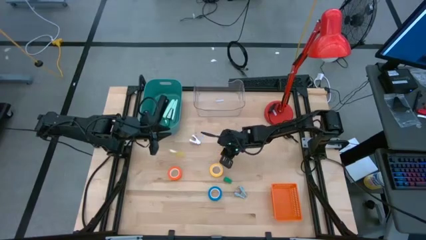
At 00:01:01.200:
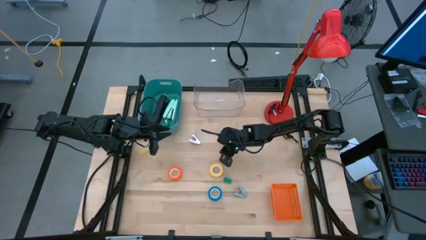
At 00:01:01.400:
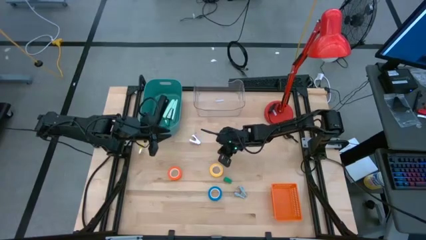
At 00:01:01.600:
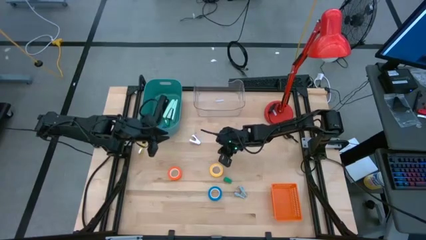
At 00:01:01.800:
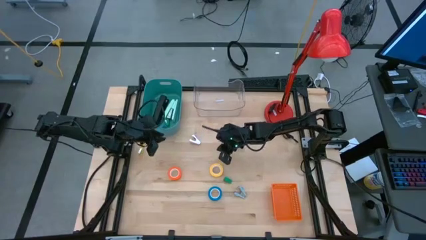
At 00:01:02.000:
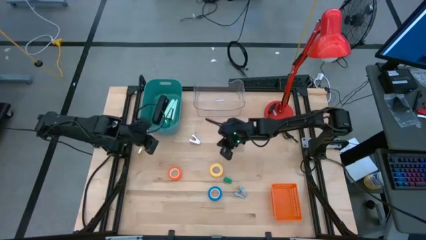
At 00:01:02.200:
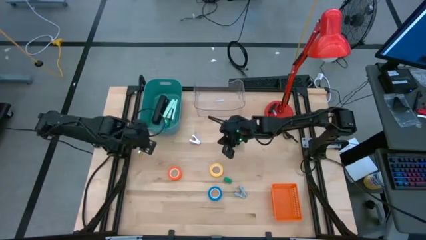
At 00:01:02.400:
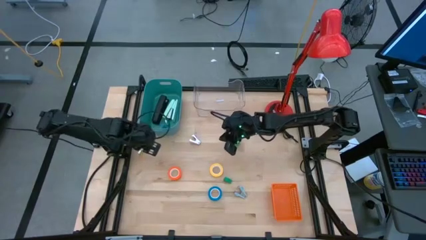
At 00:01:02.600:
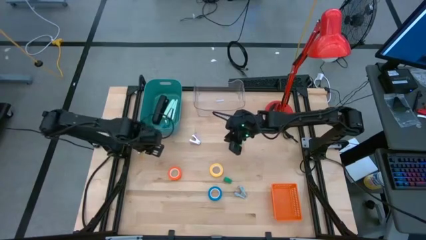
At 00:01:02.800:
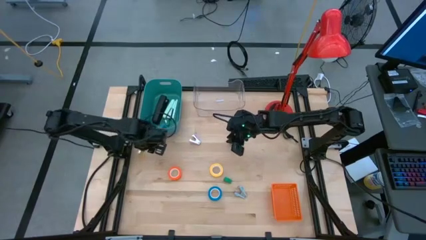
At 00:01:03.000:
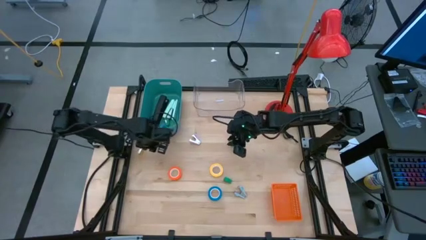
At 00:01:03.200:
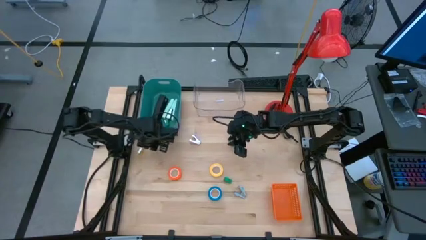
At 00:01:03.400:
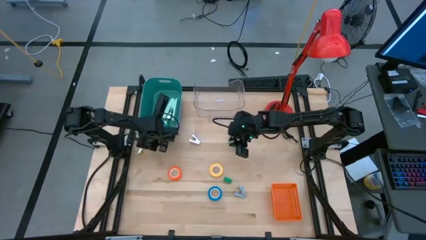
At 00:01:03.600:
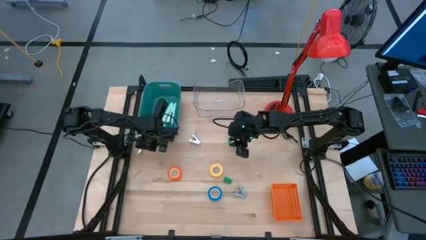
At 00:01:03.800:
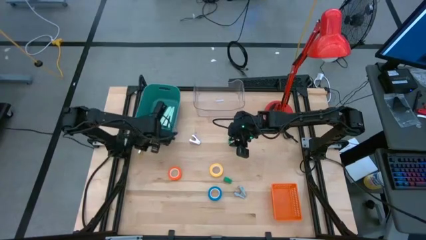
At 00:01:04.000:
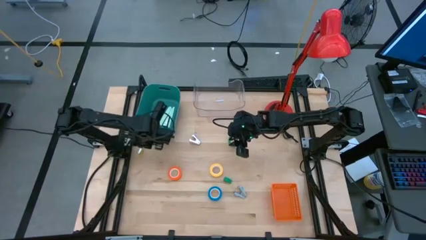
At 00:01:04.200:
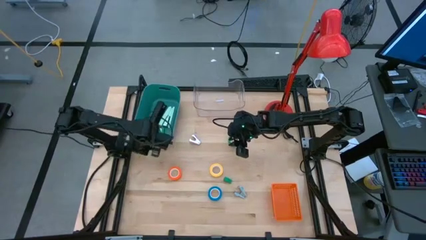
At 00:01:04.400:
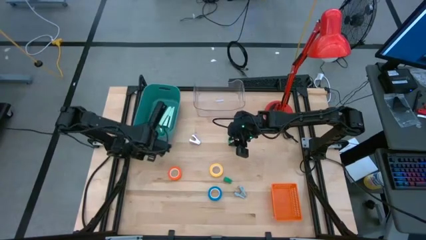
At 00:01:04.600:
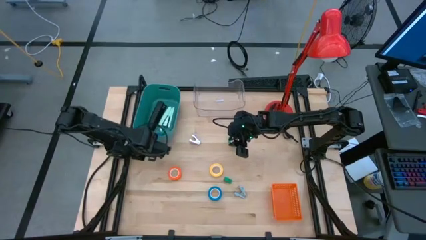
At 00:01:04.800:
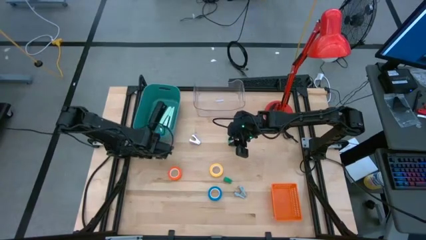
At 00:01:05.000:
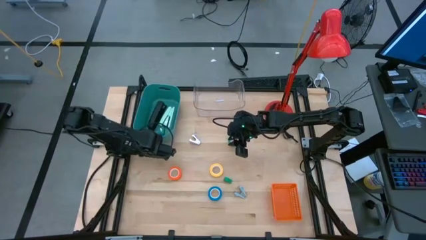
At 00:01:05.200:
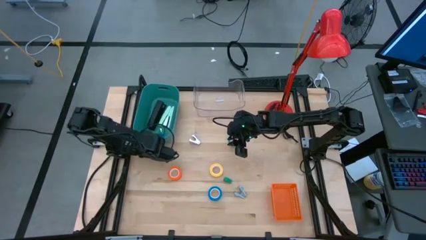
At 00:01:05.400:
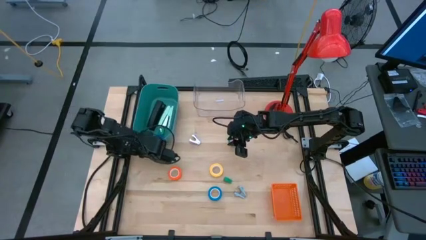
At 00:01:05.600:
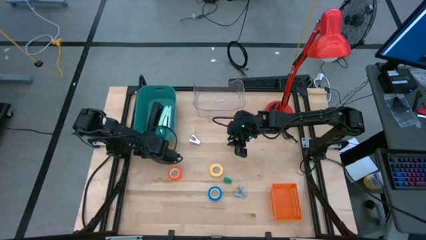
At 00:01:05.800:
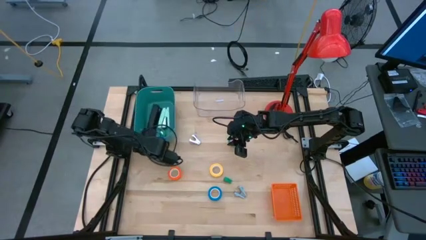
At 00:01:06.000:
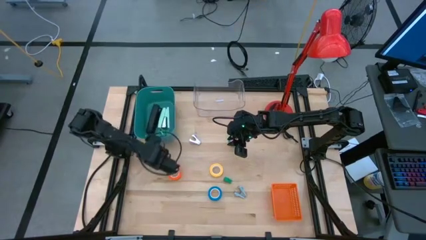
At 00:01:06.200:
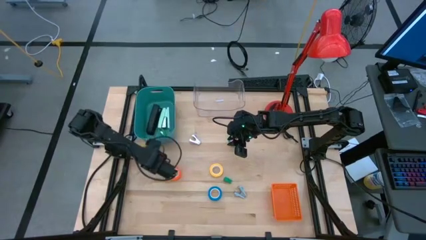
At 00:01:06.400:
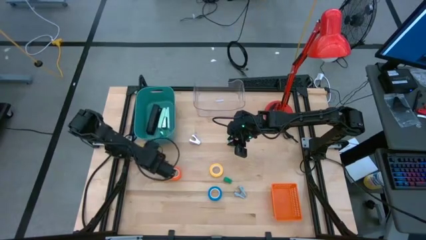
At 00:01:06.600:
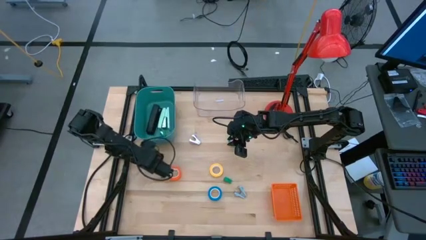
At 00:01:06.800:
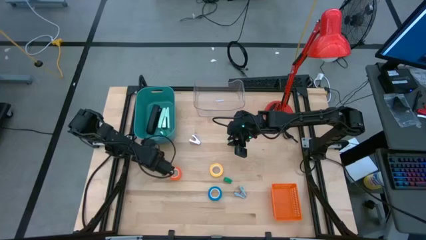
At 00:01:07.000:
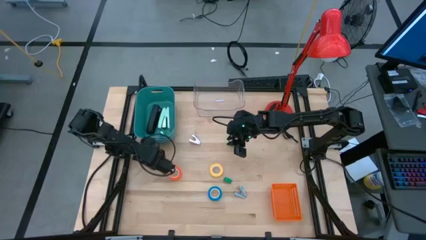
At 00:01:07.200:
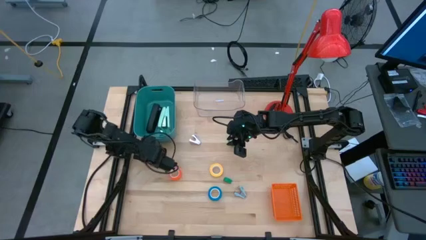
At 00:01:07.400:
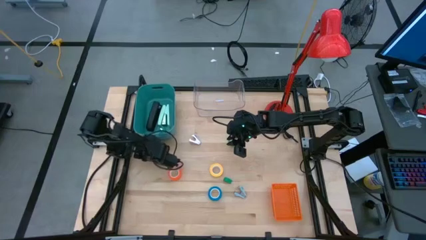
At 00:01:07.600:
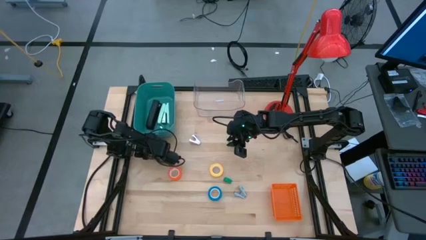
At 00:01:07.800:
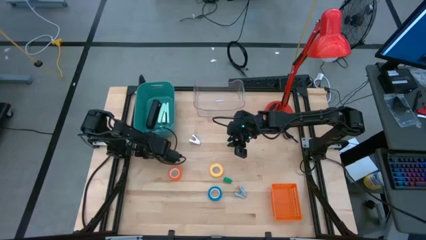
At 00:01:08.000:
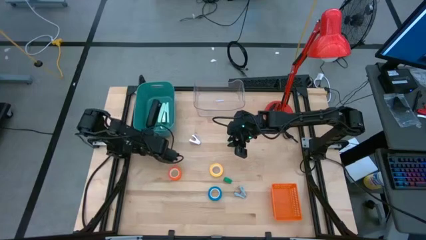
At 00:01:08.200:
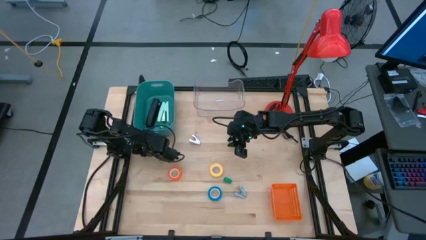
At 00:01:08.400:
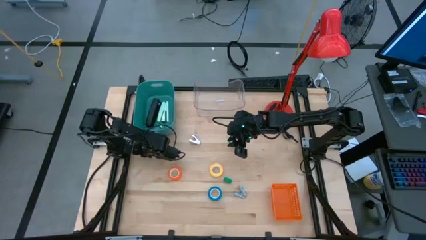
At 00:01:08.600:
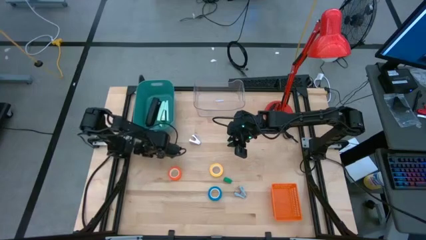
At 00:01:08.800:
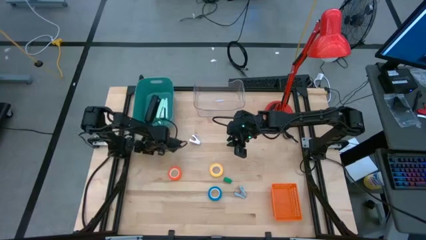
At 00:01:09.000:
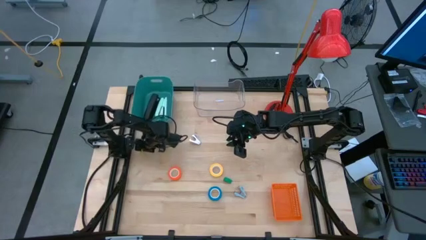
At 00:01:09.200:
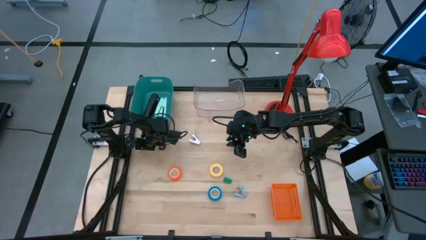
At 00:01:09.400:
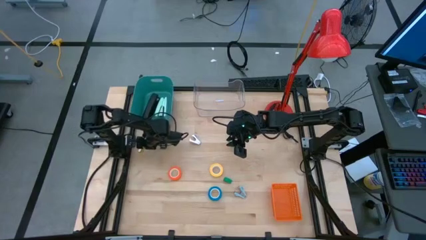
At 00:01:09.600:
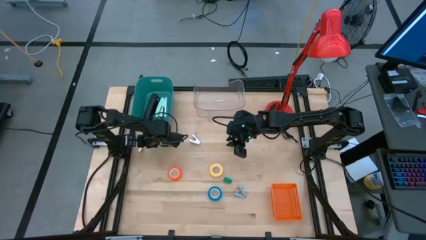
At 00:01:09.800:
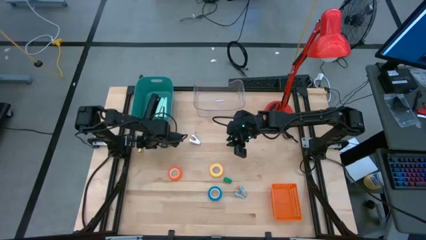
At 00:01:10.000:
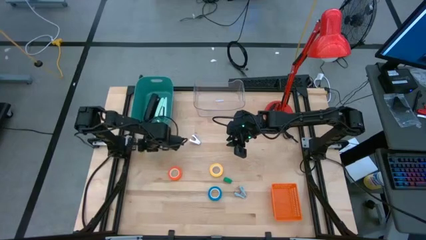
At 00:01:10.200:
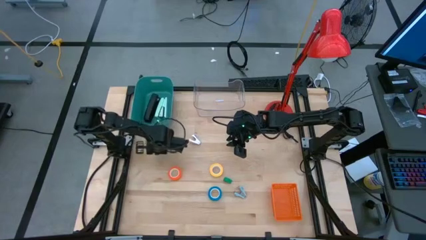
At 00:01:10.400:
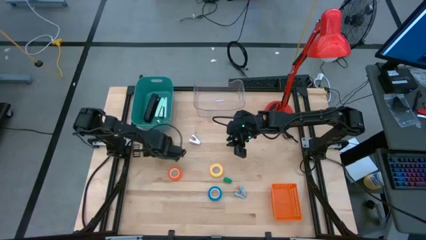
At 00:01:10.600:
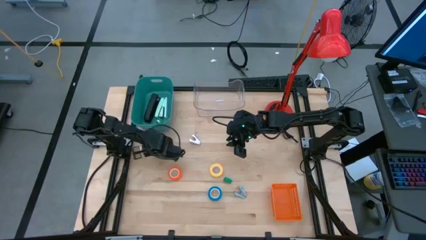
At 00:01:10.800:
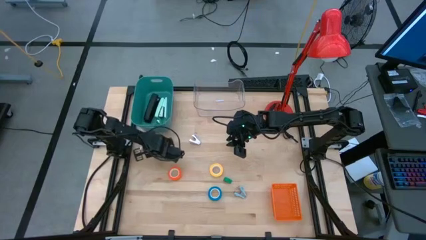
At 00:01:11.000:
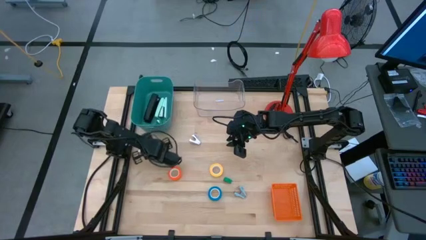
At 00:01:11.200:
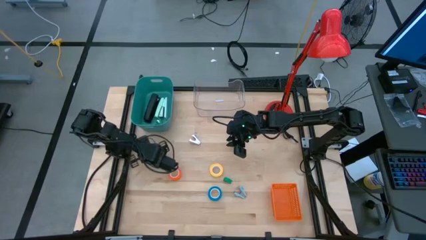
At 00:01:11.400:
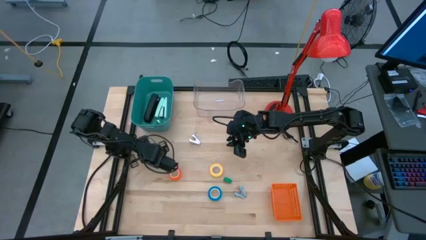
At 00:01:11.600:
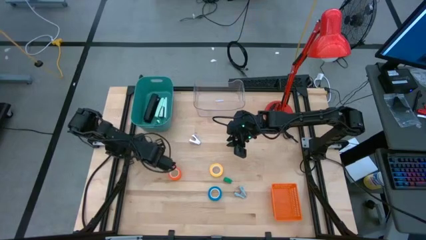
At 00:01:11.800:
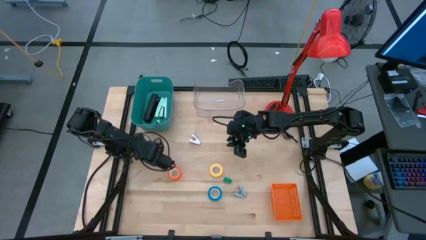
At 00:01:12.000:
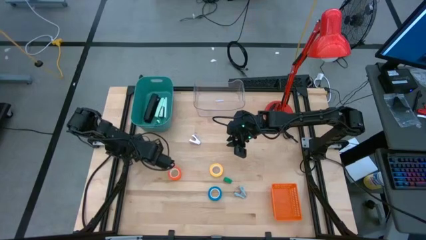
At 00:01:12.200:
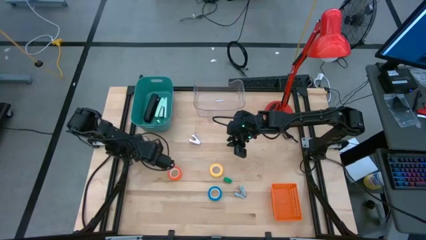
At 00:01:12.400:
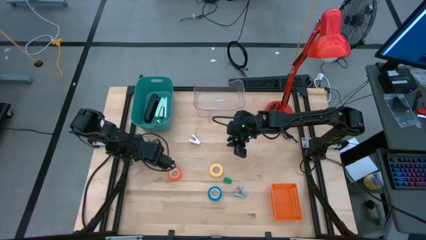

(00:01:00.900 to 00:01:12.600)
Task: Pick and place Stapler, Stapler remover, tape
Put the small yellow stapler into the green bin

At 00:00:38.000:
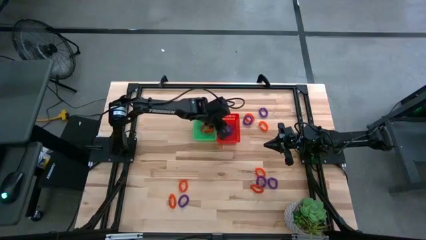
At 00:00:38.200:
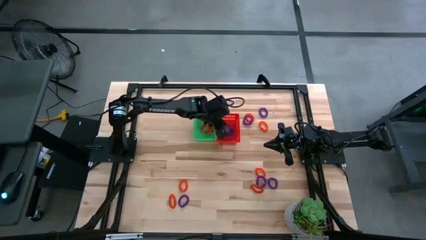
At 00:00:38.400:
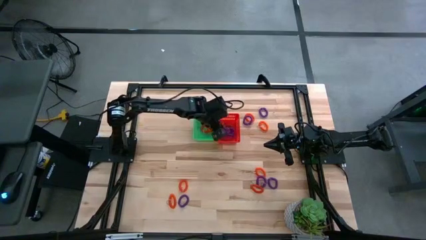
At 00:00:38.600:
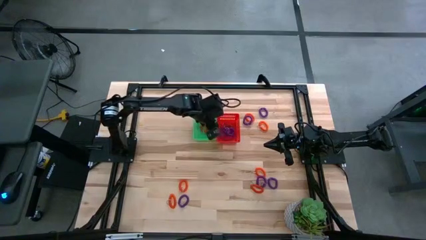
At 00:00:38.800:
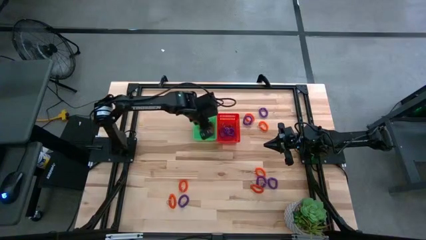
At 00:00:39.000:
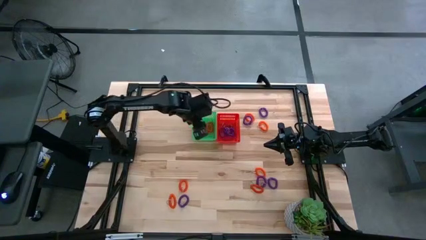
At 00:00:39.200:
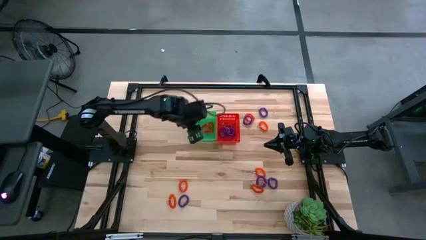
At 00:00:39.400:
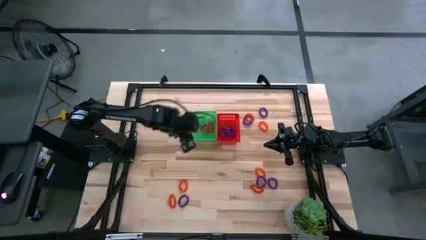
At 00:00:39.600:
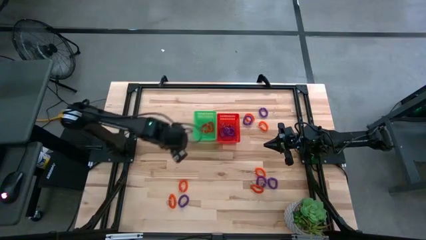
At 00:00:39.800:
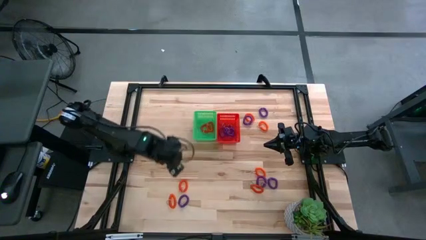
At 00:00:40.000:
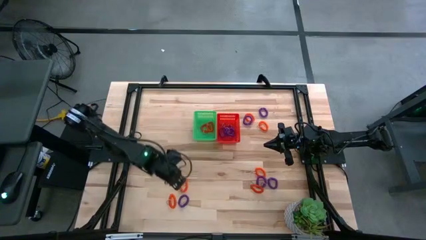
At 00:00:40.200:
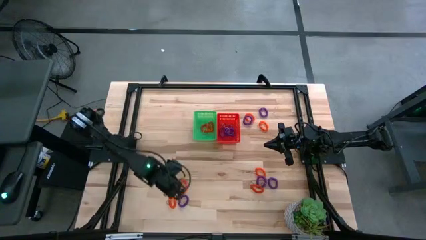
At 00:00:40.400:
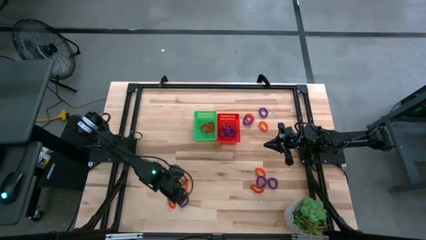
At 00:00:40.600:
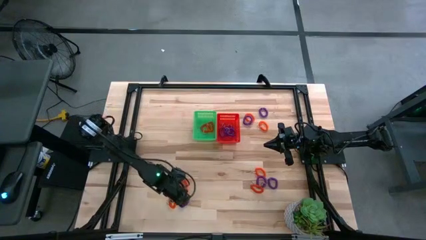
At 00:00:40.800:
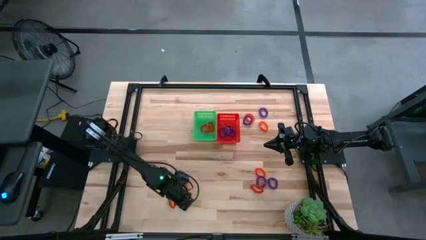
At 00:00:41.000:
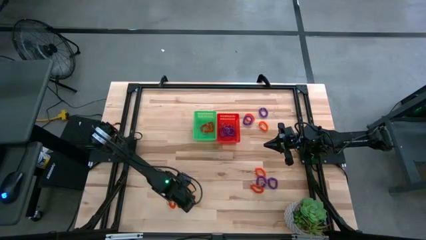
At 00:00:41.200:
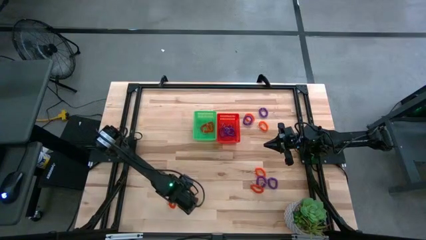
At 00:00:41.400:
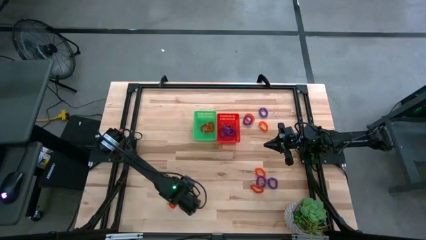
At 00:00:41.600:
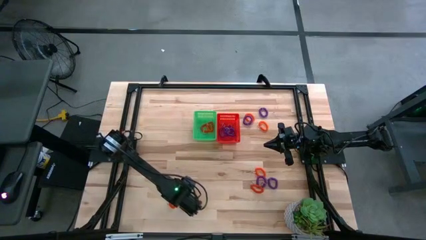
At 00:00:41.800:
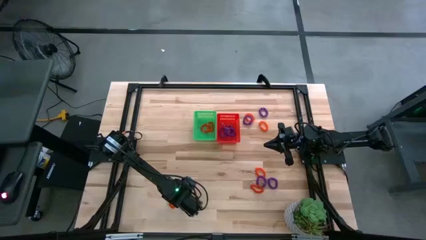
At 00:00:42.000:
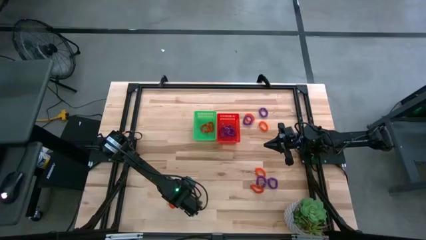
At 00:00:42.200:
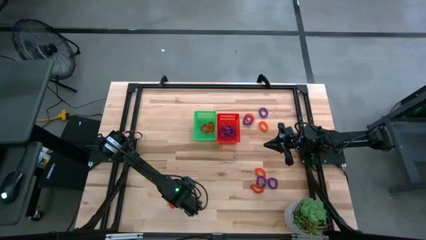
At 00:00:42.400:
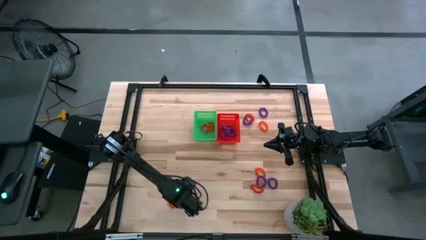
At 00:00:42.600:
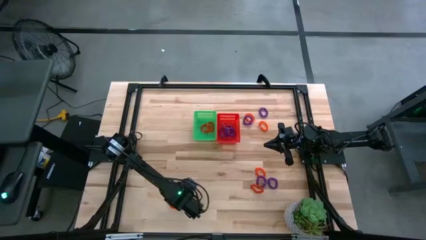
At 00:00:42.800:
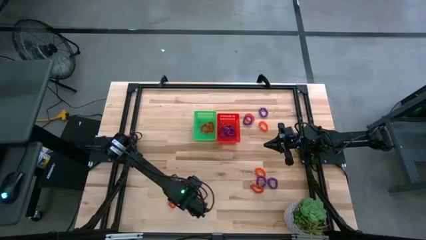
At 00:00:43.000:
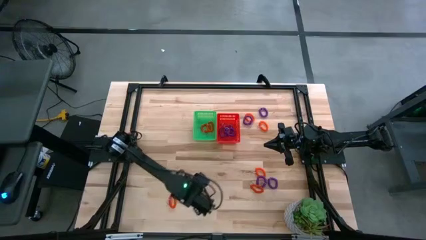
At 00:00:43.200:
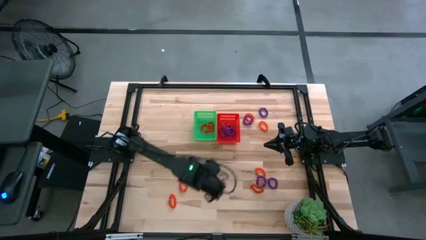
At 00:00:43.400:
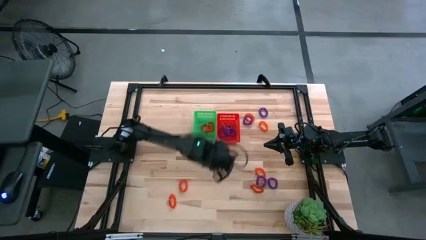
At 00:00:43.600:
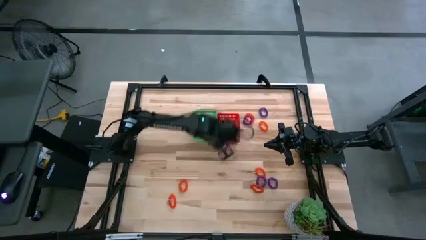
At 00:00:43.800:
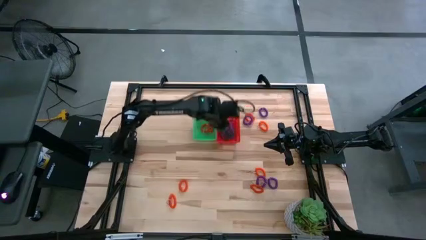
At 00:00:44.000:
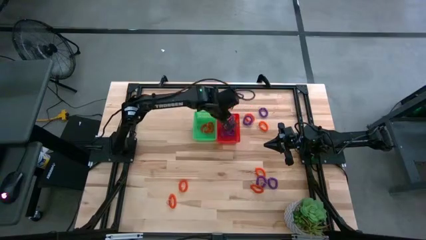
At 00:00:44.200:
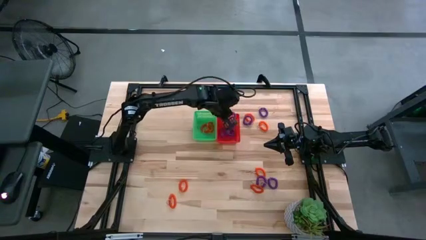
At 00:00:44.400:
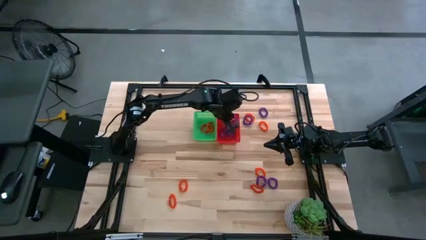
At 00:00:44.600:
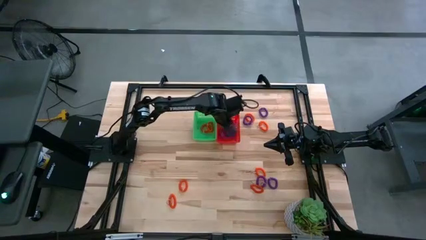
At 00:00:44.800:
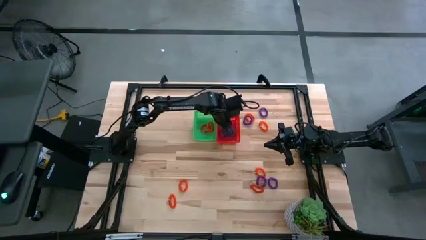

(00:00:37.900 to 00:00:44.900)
Task: Sort spring keychains
Put the purple spring keychain into the orange bin
